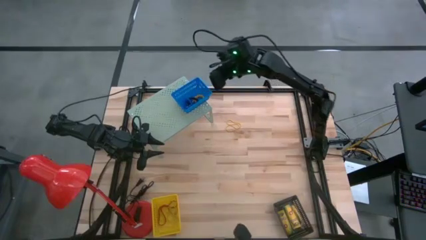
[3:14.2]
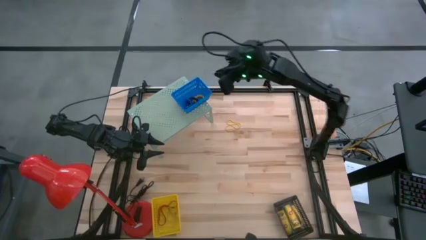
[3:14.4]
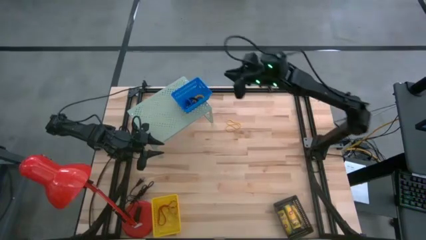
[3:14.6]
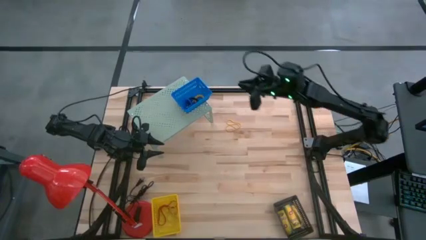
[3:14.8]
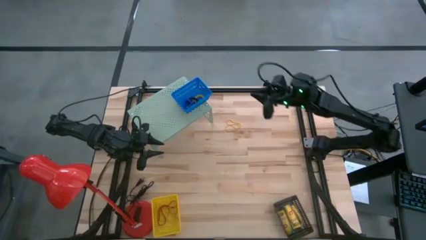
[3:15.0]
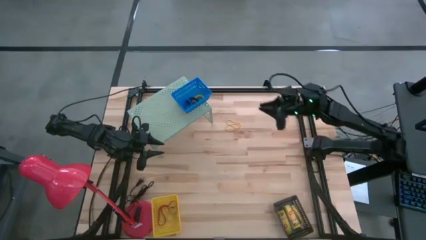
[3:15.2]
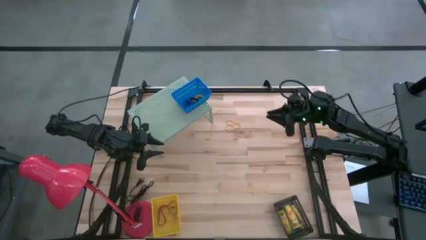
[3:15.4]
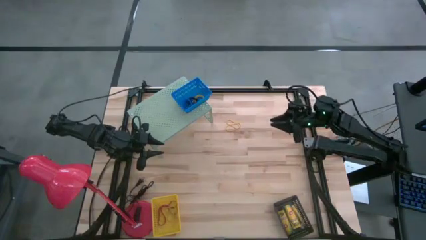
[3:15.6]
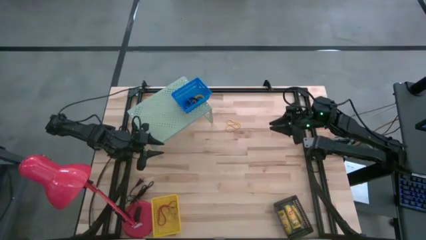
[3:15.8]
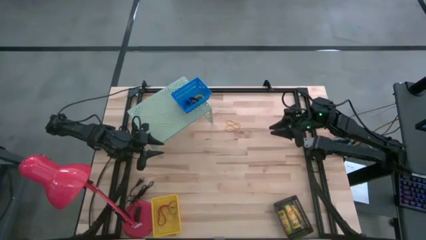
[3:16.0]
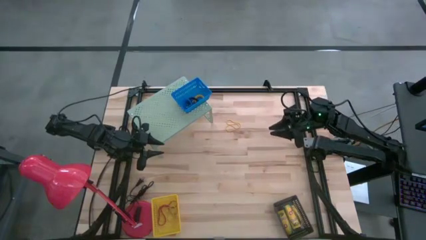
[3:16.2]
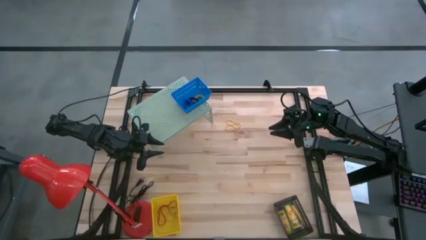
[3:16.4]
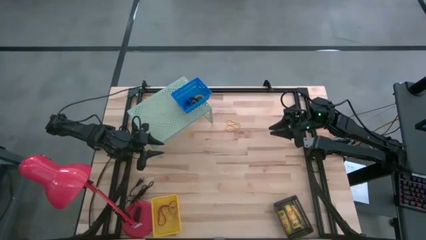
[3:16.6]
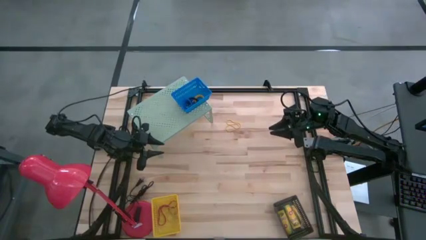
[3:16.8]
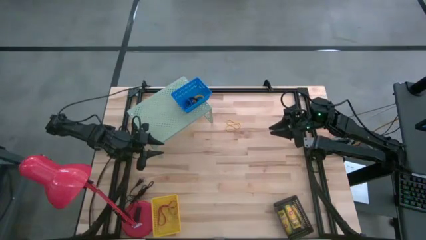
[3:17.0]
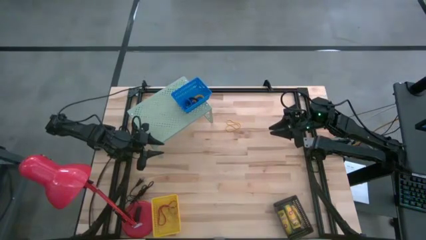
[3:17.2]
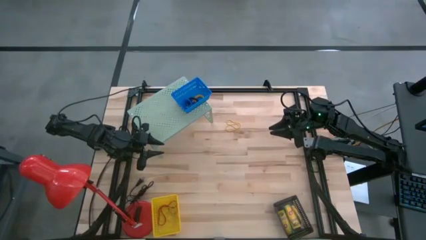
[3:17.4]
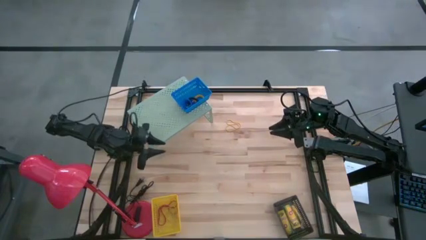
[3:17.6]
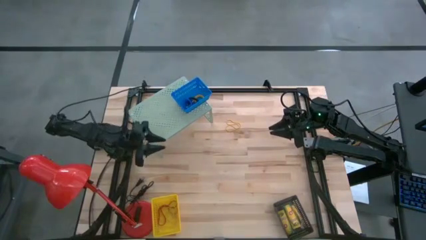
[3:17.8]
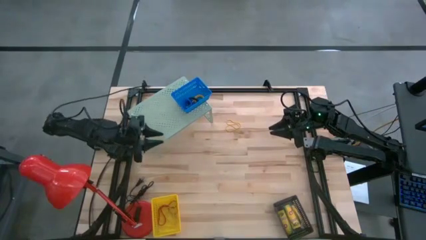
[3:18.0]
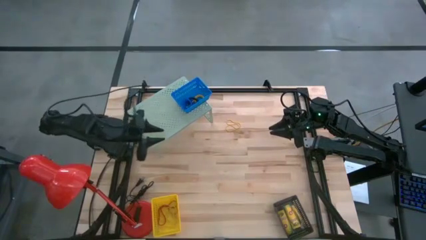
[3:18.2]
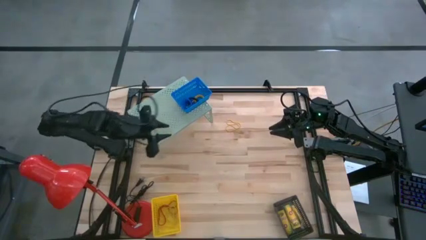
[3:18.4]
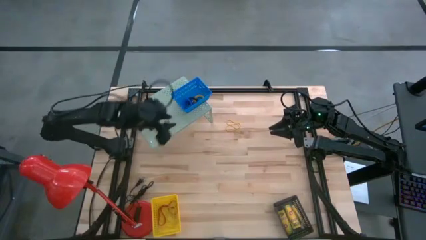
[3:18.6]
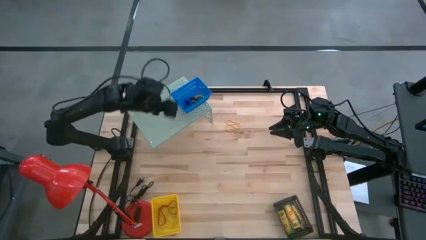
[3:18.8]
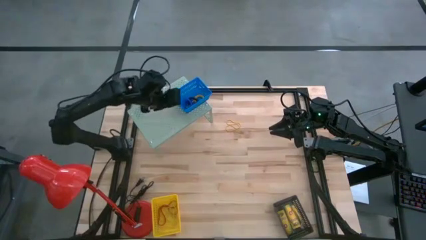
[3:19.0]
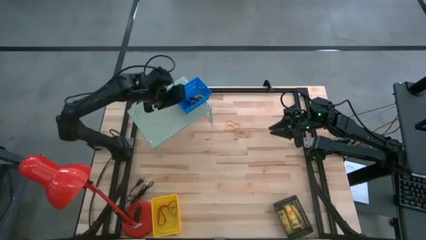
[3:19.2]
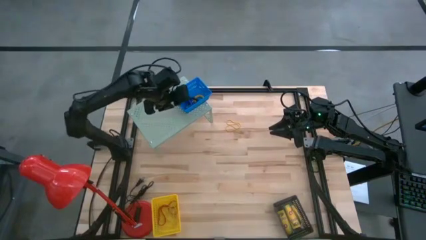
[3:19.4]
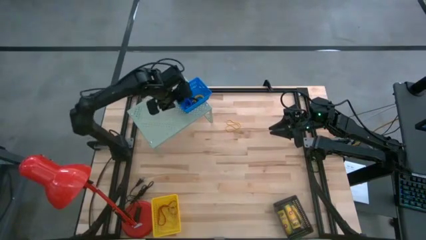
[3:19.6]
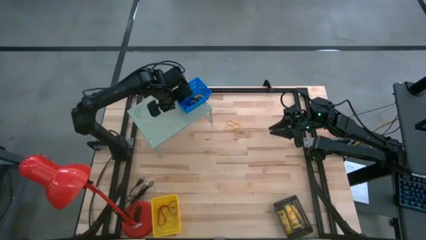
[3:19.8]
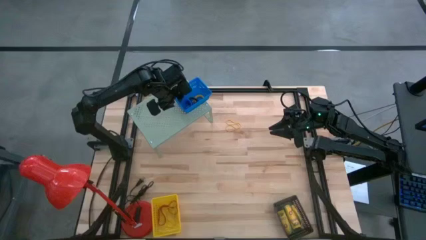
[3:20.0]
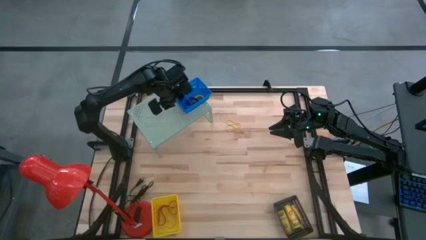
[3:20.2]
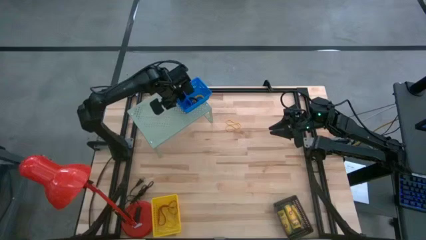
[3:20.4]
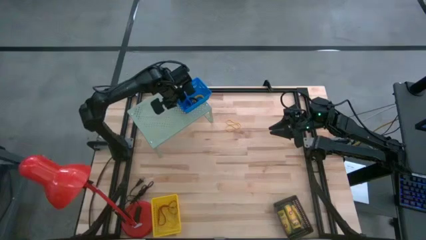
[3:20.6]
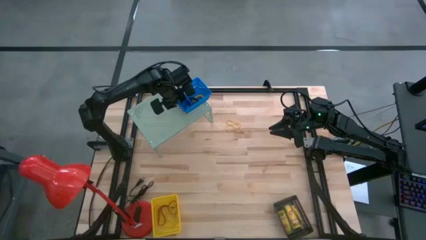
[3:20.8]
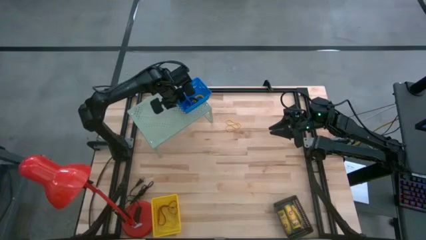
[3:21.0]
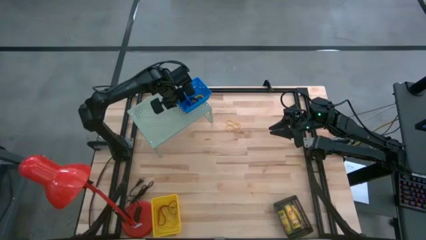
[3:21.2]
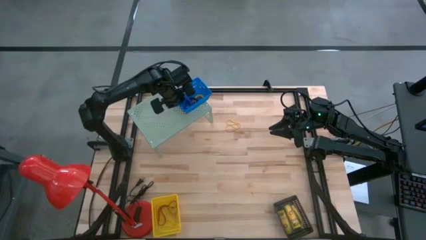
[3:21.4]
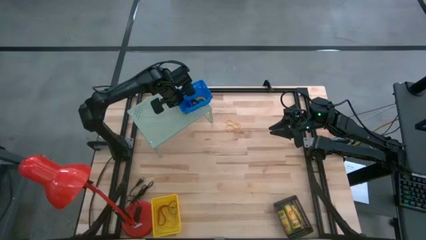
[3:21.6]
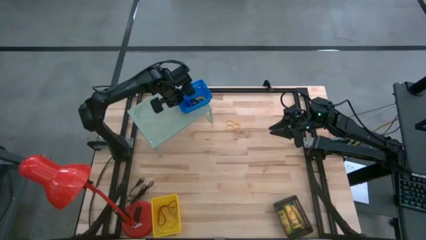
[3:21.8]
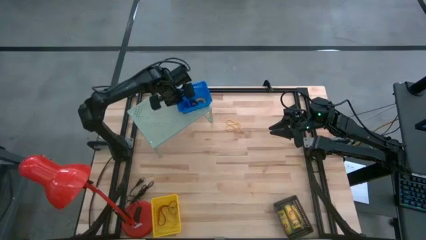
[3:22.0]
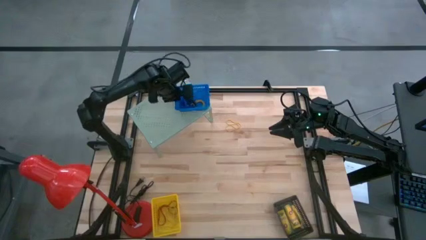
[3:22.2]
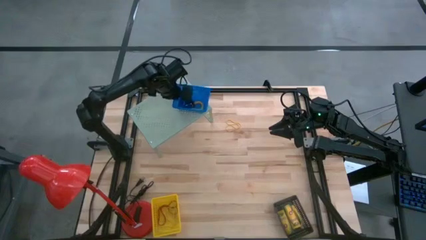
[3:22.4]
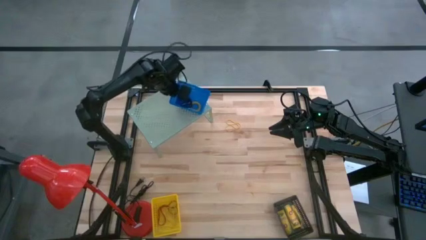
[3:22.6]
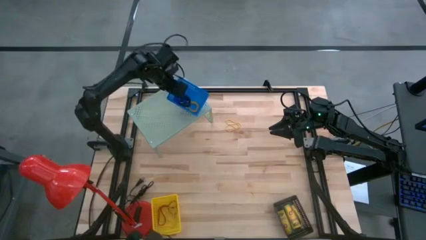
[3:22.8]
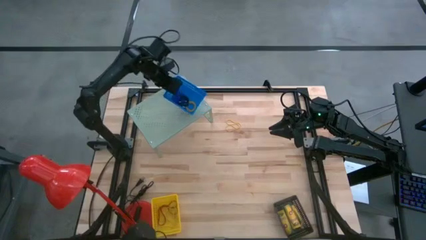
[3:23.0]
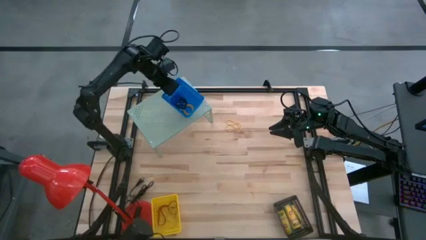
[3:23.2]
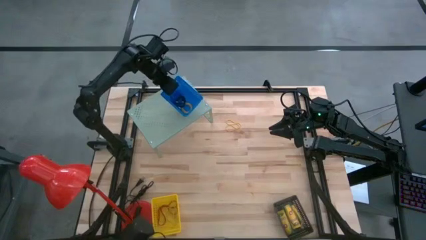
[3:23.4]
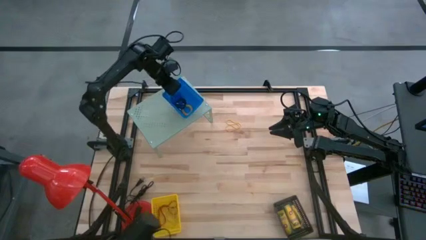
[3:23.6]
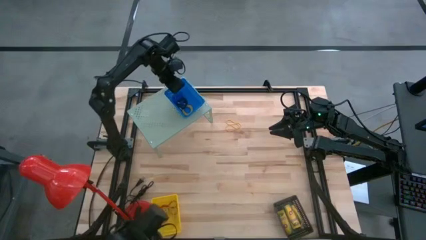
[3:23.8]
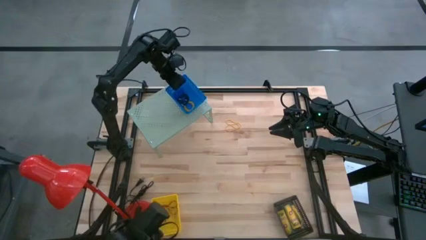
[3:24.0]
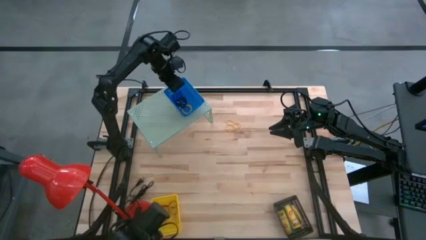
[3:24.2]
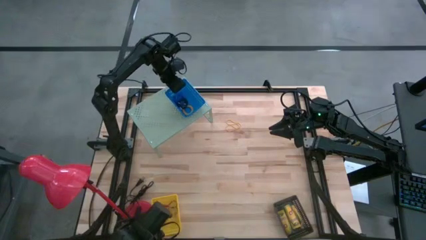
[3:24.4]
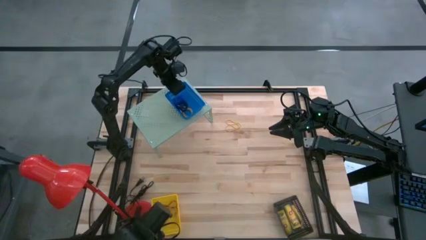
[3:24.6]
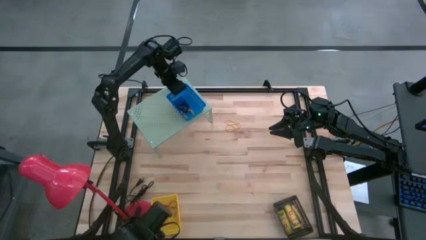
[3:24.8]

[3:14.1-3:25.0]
Task: Pick & Place Office Desk Supplies
Put the blue basket on the shelf

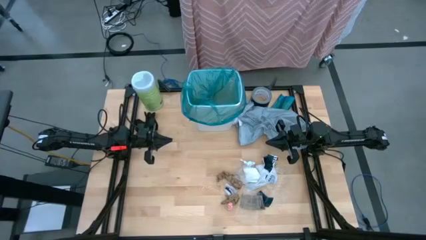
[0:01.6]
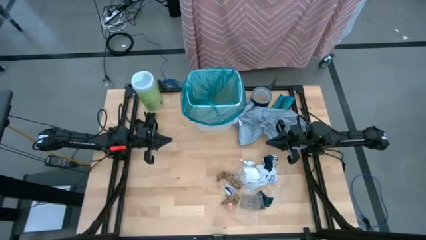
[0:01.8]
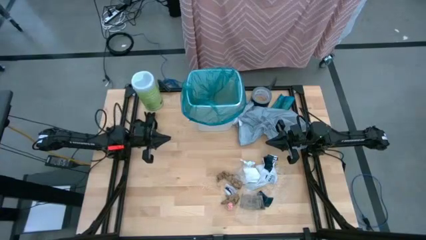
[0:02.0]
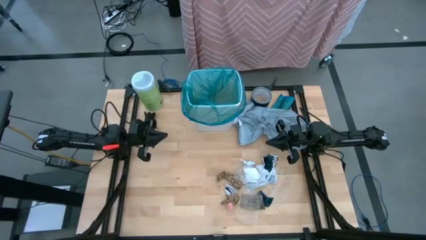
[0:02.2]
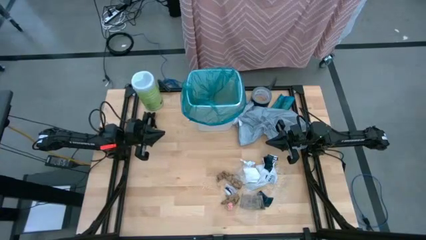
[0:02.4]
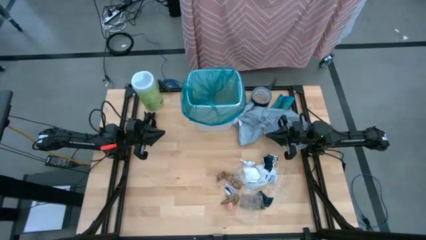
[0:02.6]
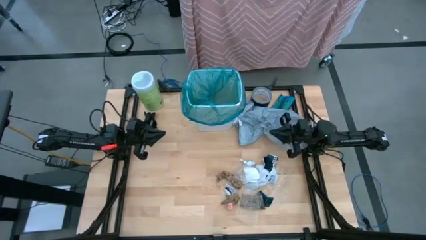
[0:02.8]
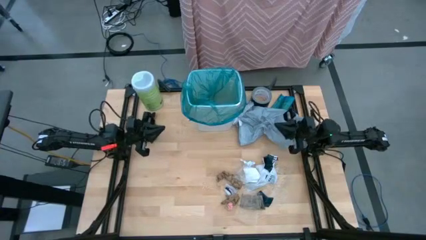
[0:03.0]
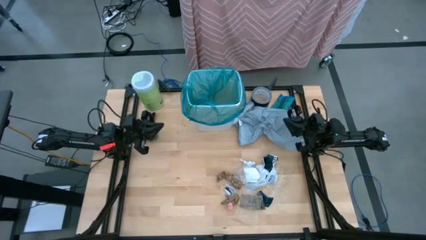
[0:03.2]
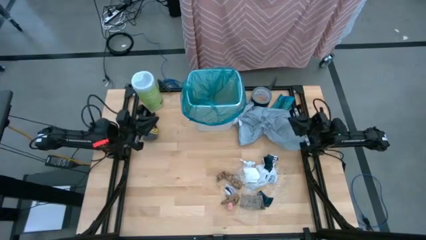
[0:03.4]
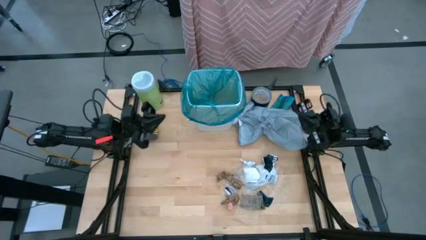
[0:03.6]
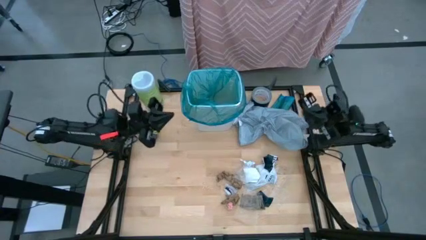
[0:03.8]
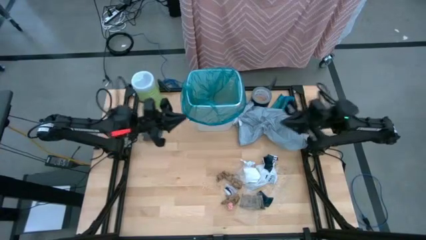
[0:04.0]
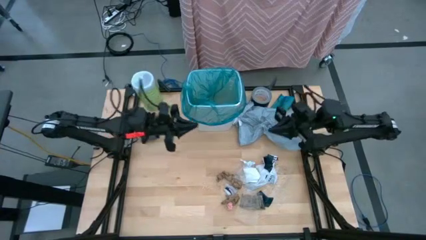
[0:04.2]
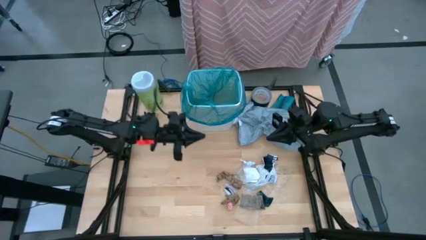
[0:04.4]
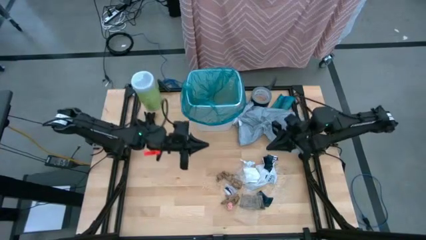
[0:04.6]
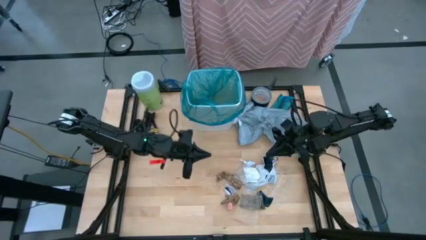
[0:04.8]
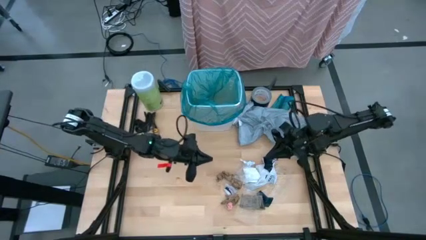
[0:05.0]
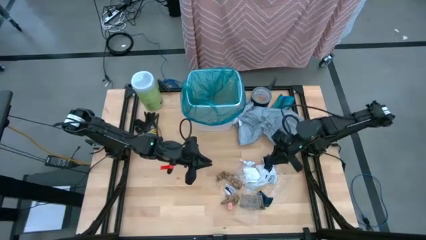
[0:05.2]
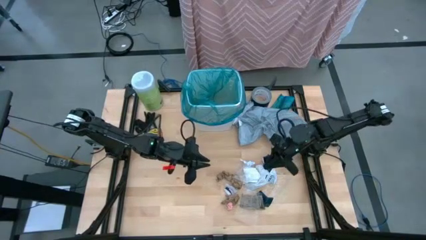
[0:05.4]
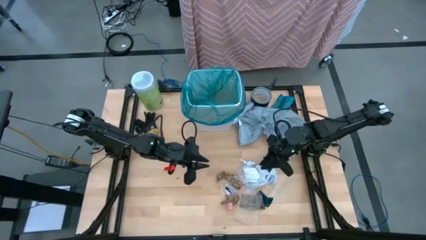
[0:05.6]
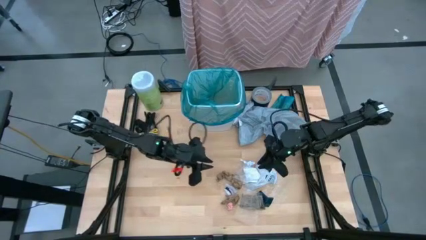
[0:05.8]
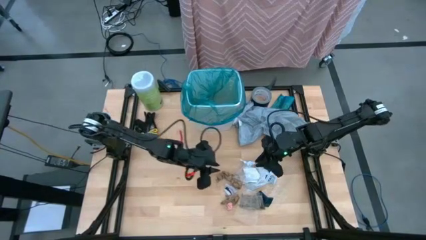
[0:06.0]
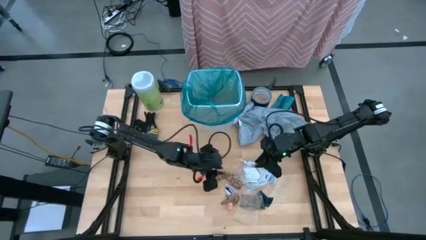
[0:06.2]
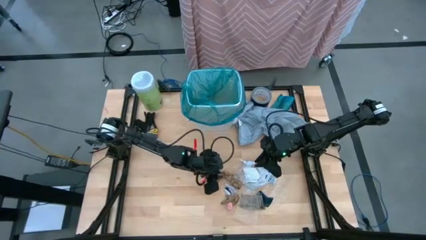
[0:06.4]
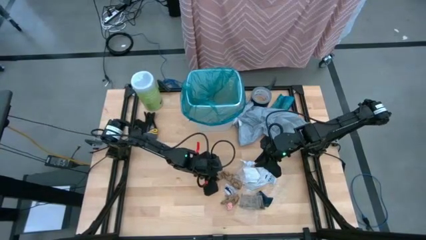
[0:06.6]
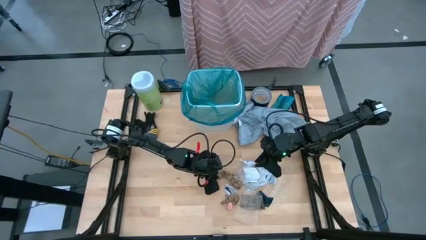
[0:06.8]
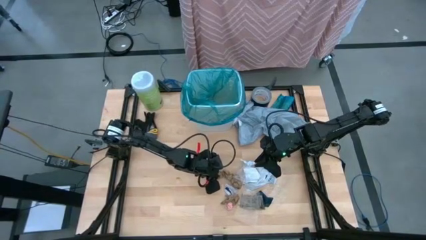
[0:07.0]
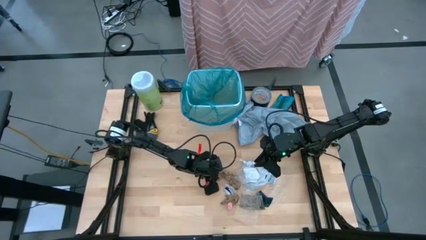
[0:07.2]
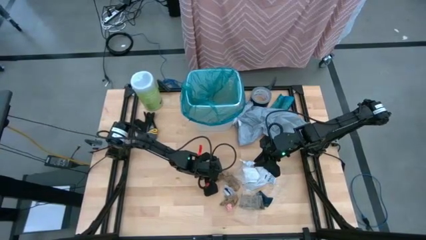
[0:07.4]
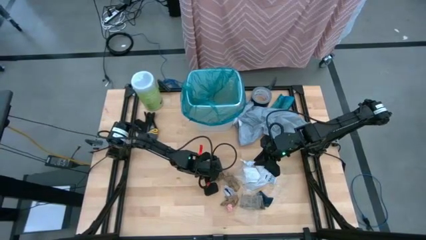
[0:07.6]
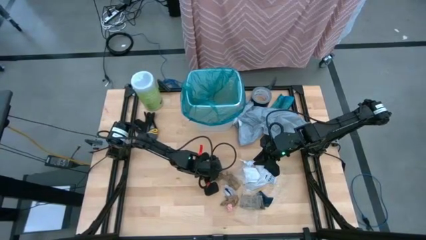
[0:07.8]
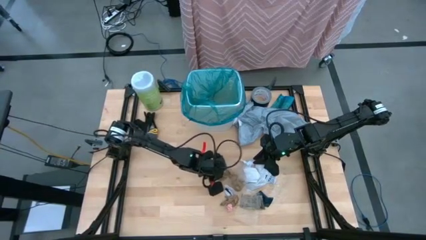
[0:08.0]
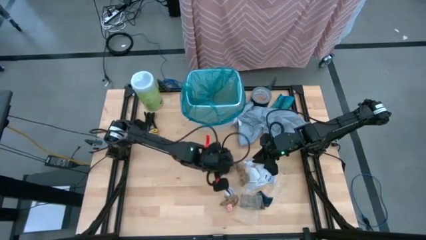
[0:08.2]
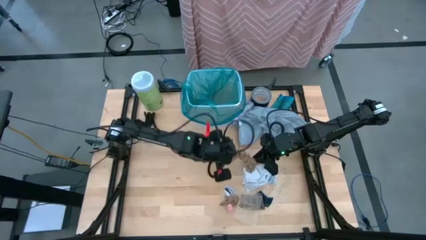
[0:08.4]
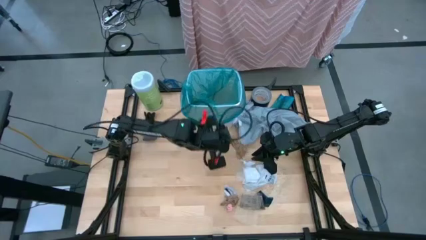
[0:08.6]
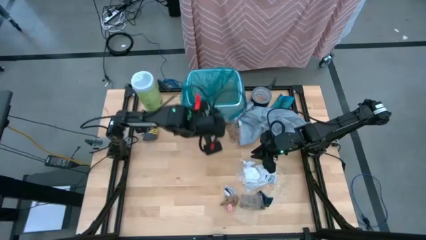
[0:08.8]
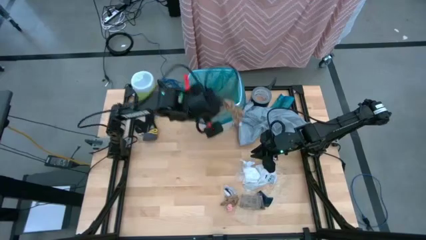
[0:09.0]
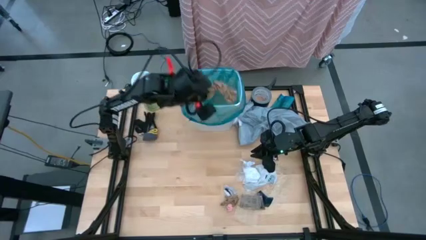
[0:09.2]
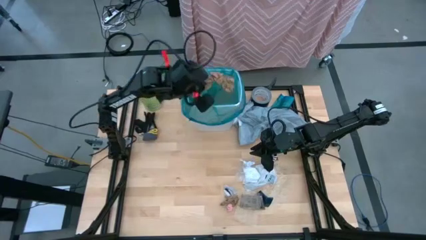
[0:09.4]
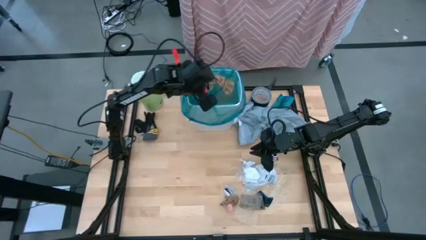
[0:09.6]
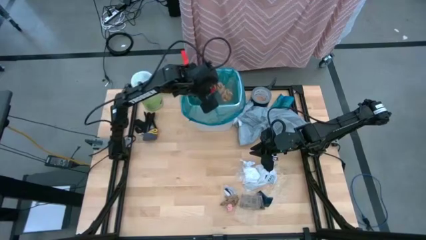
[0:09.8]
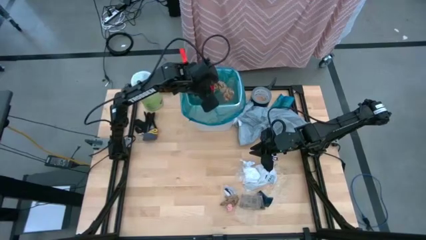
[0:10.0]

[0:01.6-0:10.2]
Task: place trash/remove bag and relplace
Put the brown napkin into the trash bin
